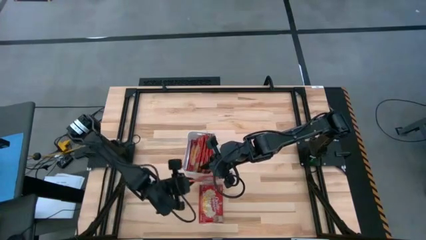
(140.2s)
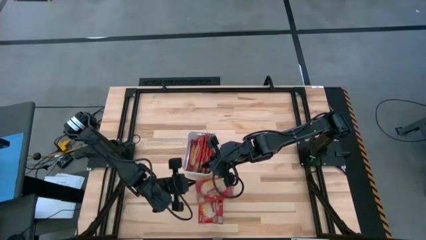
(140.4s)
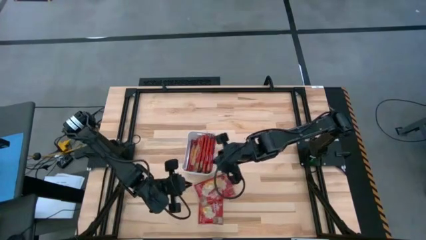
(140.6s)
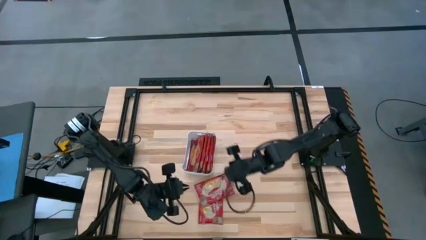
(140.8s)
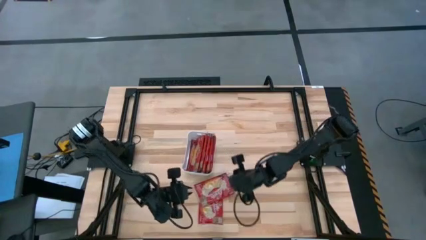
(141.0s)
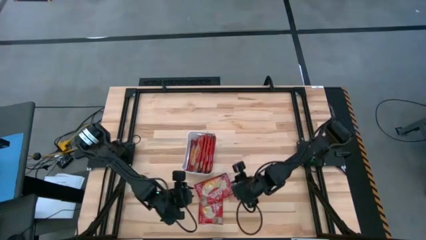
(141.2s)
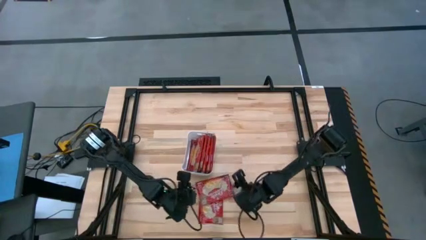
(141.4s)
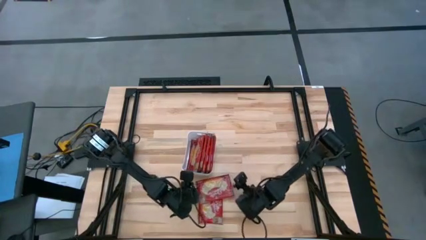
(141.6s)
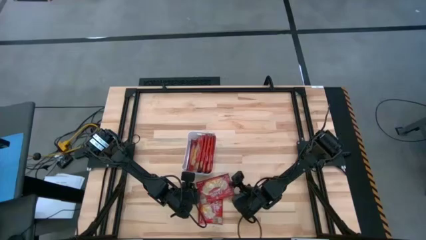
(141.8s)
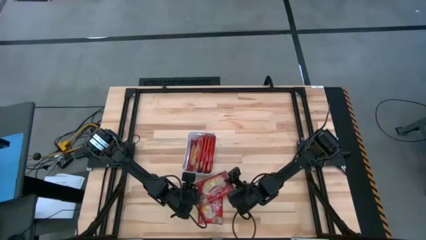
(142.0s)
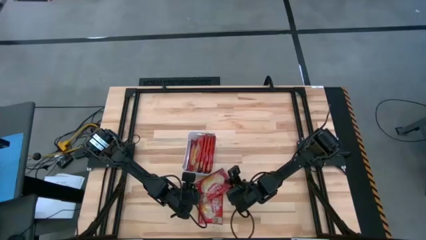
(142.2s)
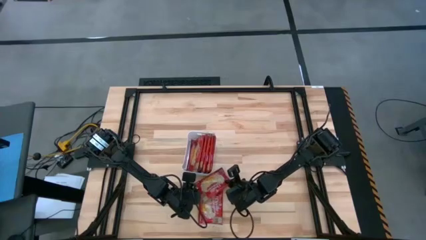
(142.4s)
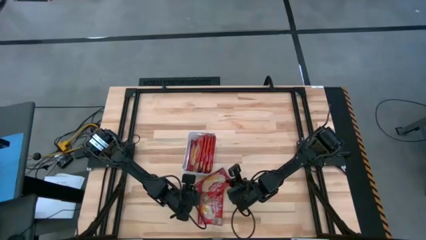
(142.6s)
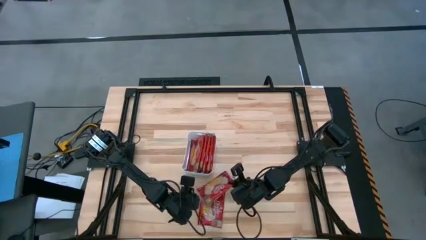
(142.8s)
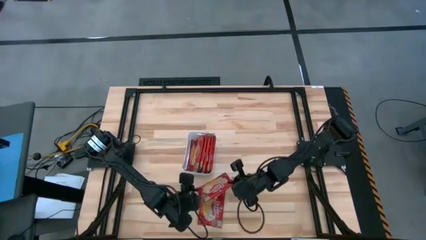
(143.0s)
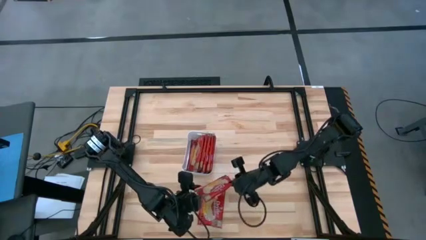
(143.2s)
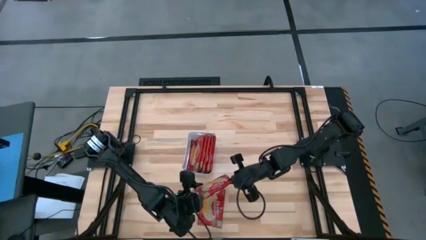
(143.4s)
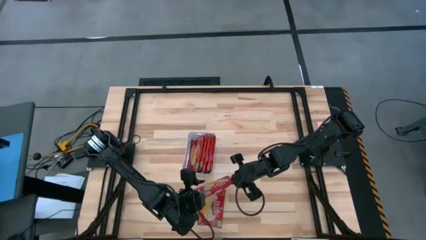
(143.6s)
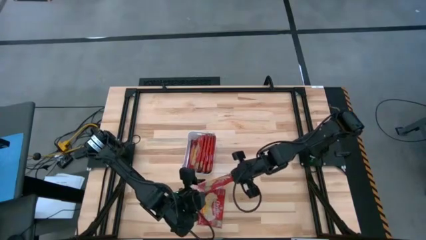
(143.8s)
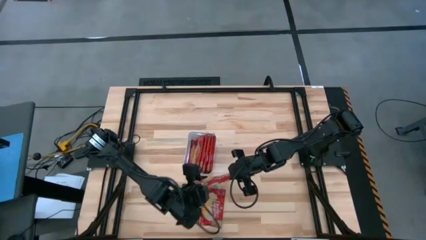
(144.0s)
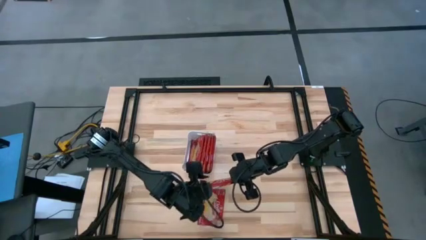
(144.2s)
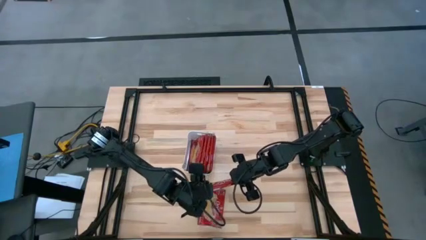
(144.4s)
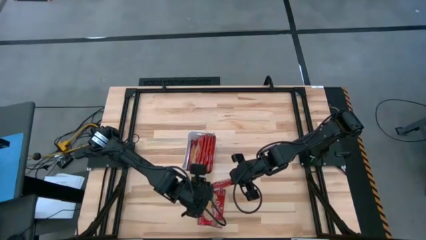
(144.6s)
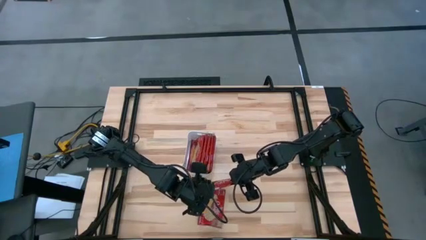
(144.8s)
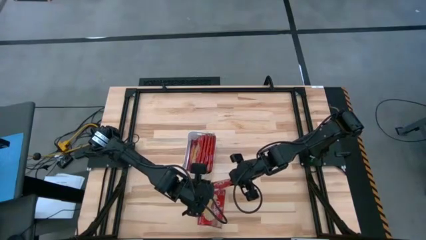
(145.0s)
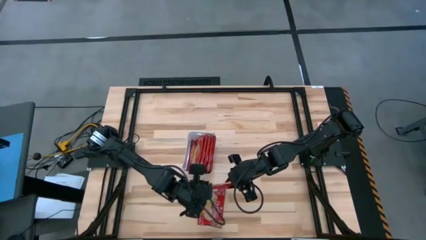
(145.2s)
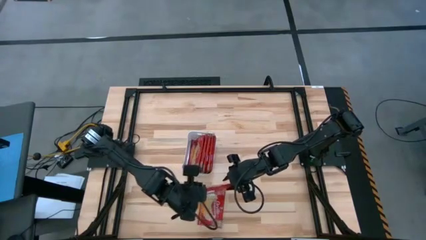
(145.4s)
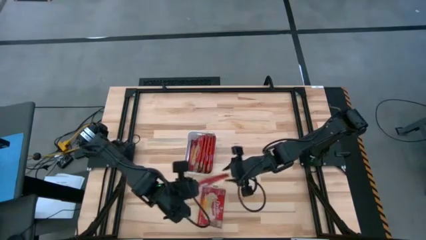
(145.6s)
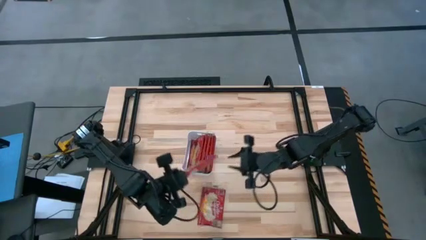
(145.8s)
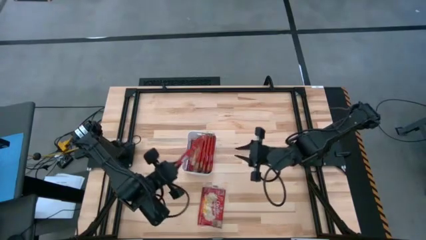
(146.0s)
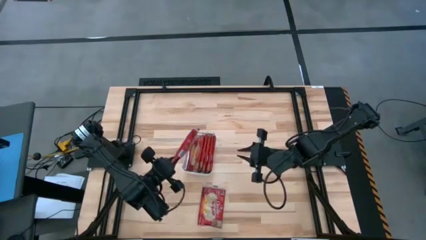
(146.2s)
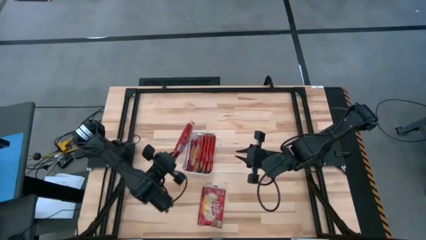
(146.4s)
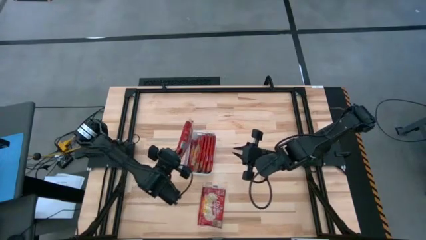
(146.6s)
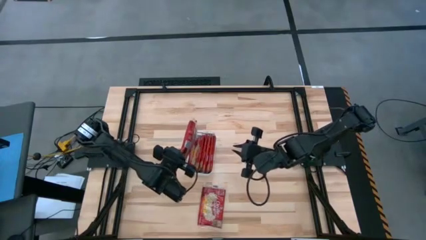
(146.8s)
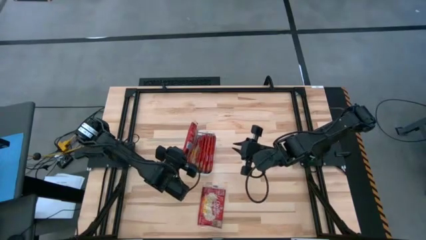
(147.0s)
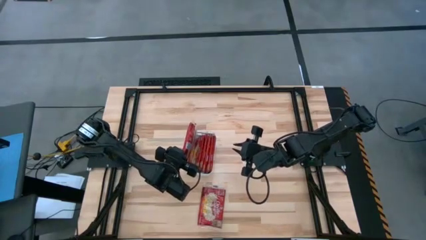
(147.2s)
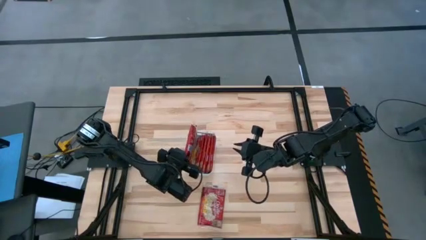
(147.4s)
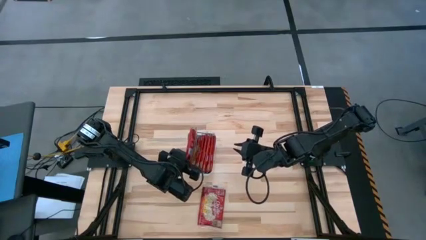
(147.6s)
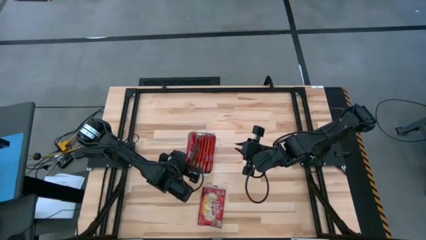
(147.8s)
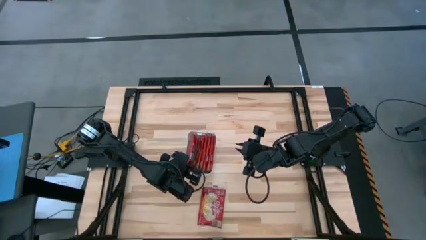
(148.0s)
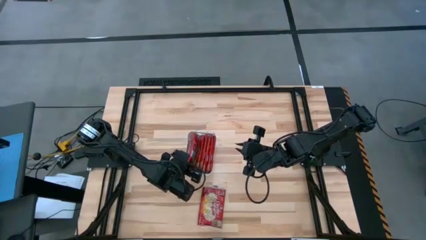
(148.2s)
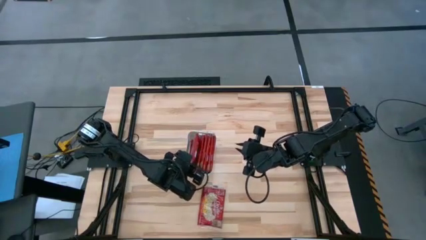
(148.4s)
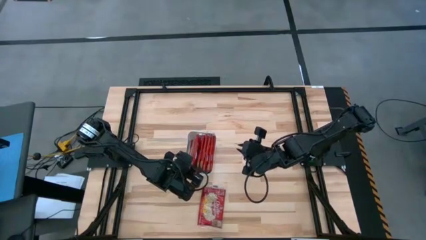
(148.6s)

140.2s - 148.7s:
Task: Sort popcorn bags into baskets
Put the red popcorn bag into the white bin

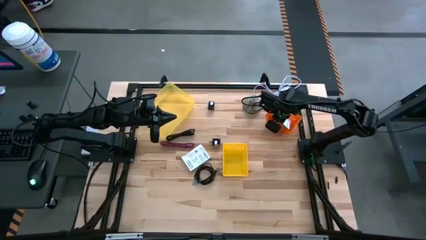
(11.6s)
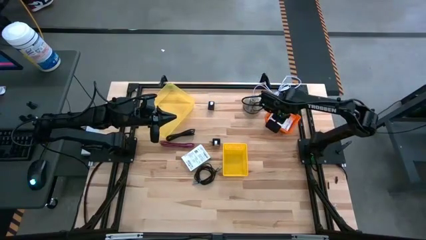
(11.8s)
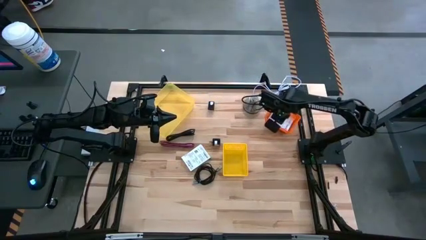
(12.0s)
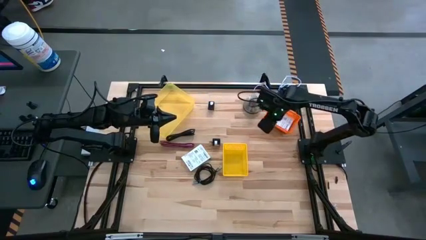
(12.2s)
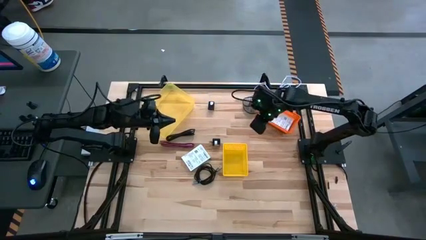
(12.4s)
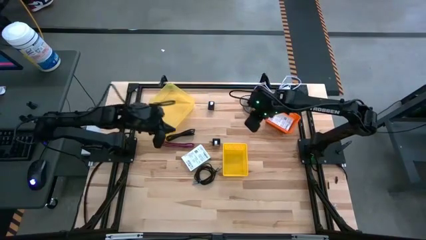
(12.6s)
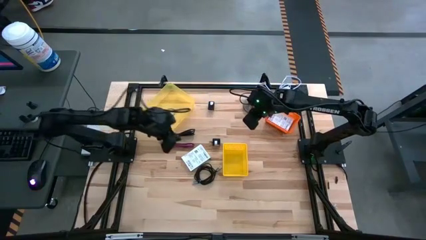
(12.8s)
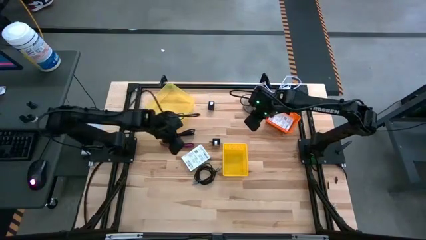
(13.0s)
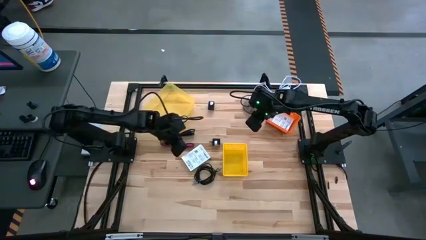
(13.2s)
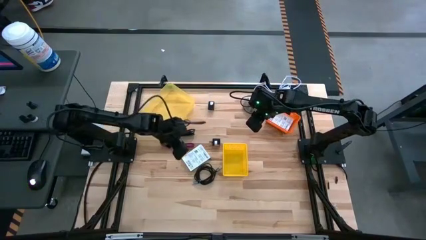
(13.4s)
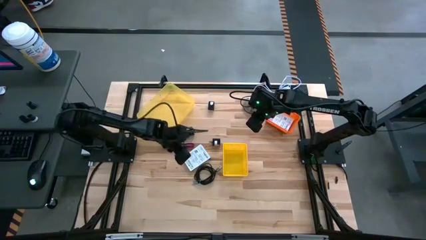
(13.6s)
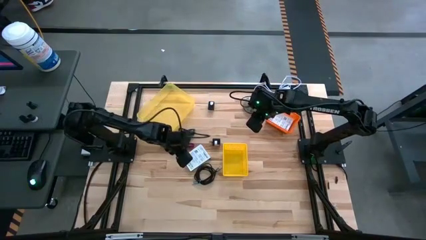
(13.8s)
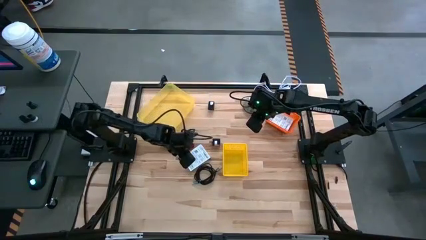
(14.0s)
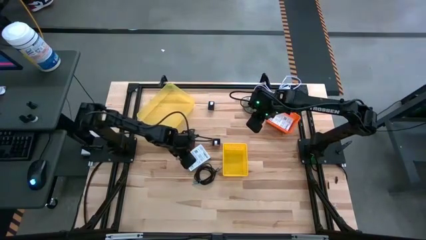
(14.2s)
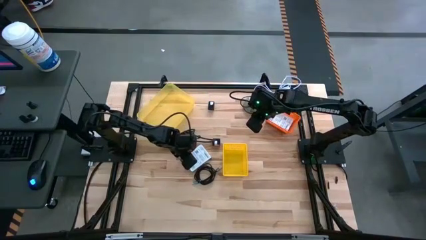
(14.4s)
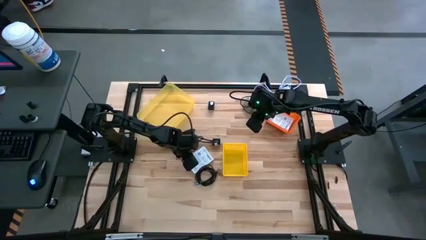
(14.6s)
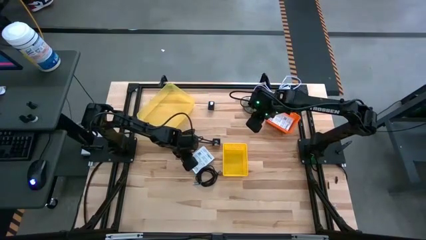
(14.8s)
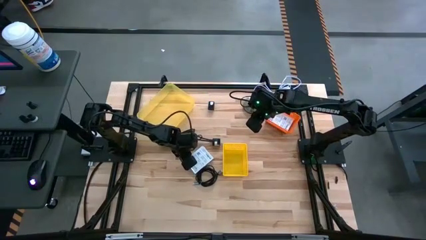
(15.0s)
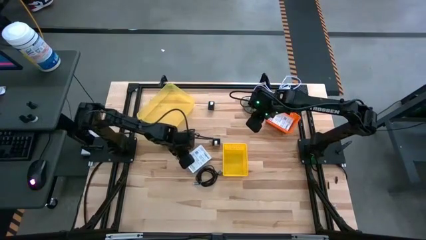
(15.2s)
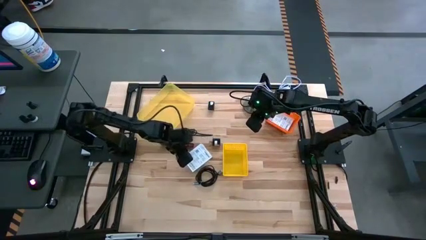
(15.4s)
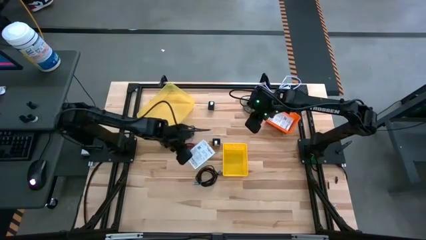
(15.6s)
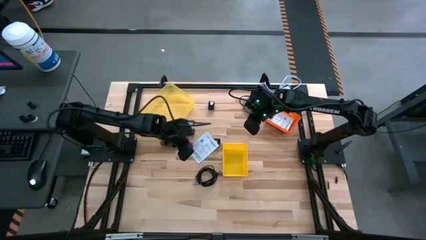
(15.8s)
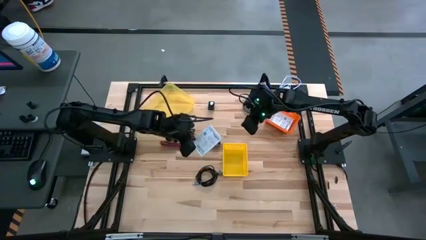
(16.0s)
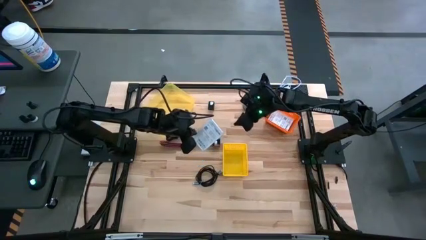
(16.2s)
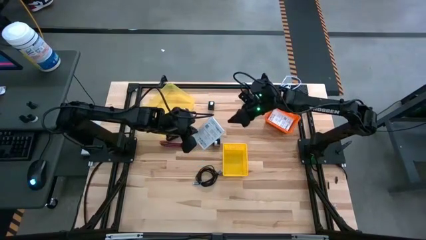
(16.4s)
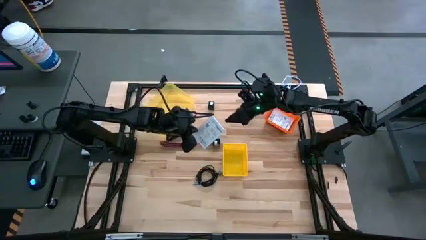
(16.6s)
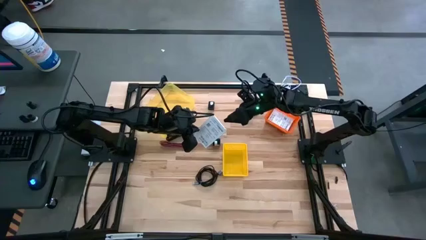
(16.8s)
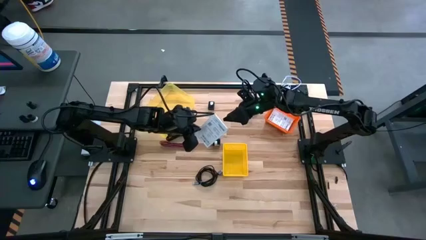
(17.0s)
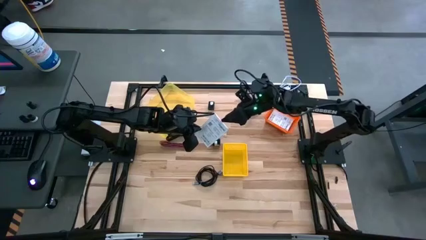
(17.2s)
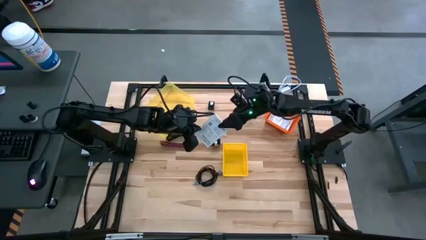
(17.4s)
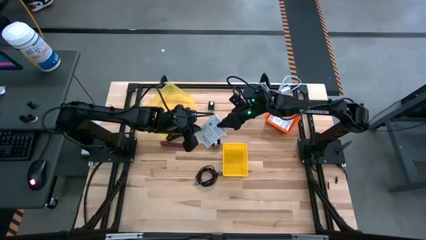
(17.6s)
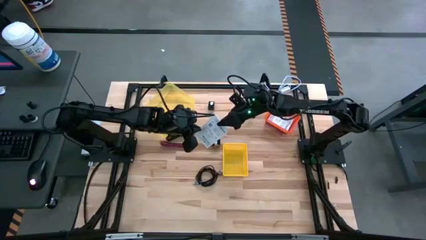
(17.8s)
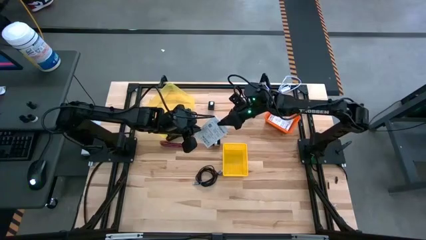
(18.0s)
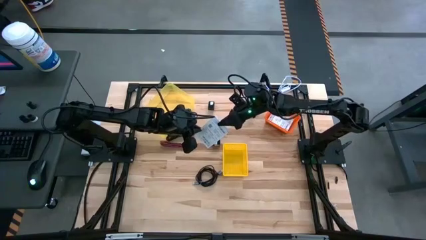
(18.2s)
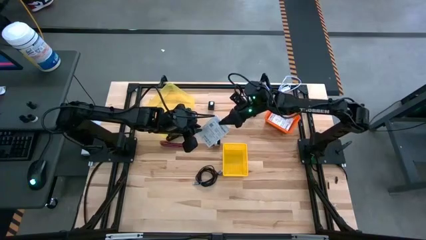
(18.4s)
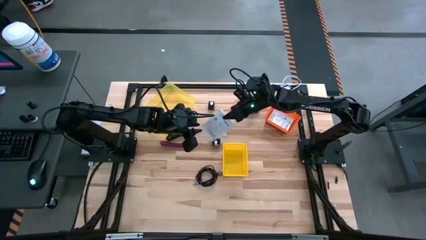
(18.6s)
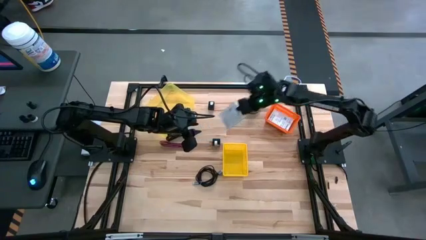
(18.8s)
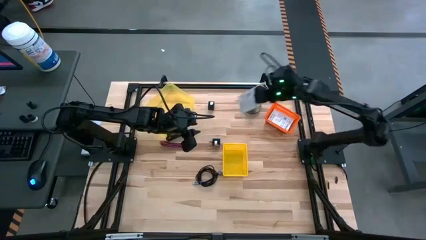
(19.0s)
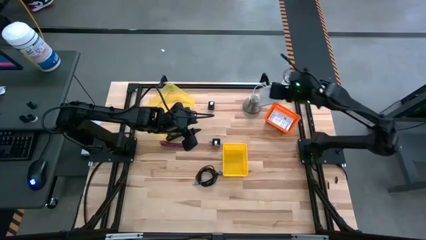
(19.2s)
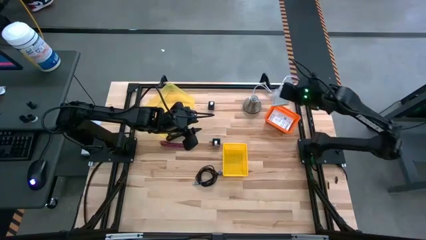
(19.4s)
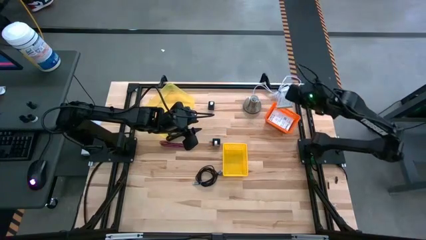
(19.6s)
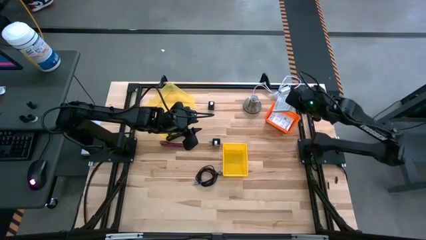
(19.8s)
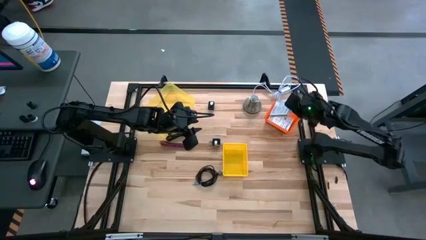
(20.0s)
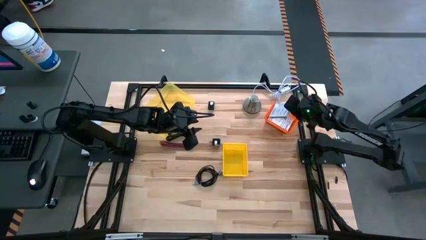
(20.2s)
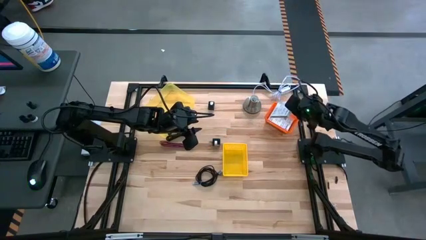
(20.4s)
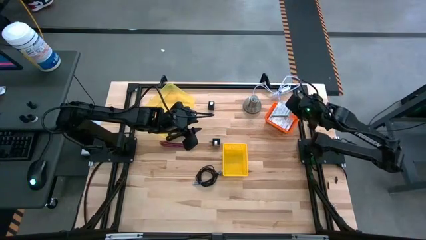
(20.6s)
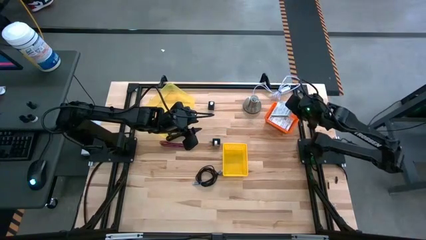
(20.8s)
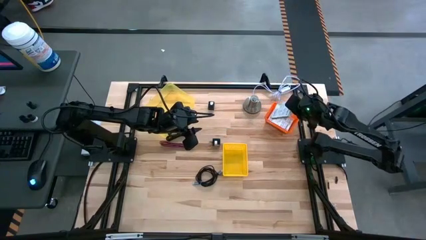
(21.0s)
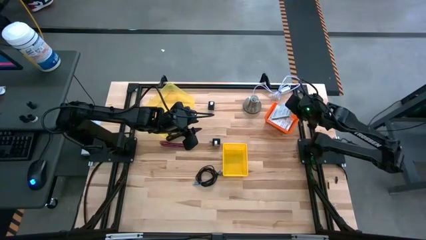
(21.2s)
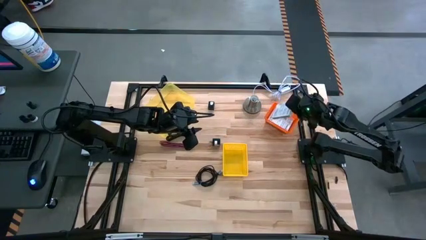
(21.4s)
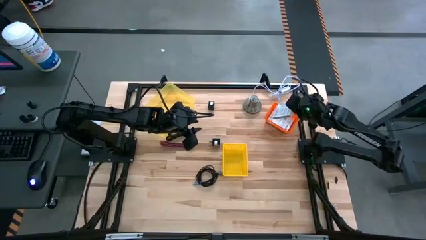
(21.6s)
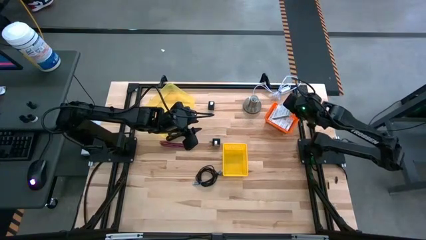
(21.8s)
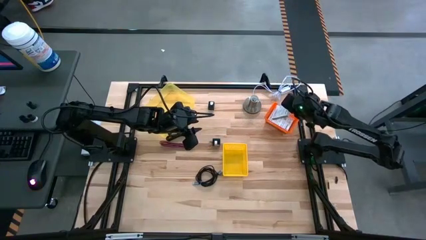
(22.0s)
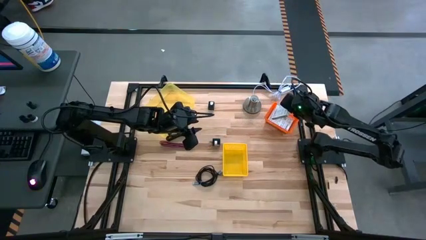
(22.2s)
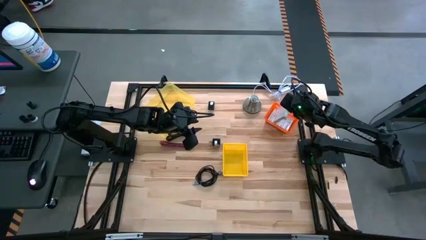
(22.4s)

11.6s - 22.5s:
Task: Pick and place items into bin
Put the card reader box into the orange bin
